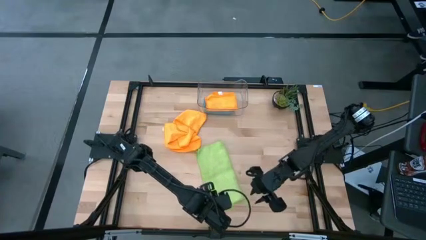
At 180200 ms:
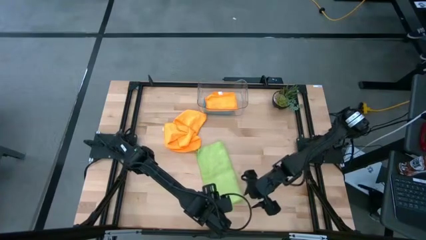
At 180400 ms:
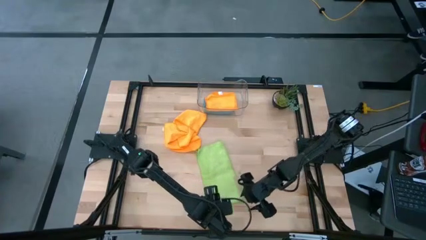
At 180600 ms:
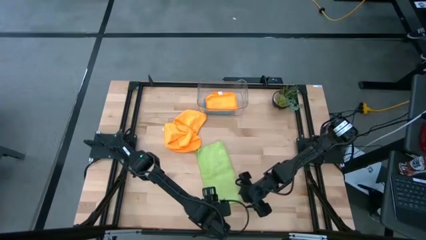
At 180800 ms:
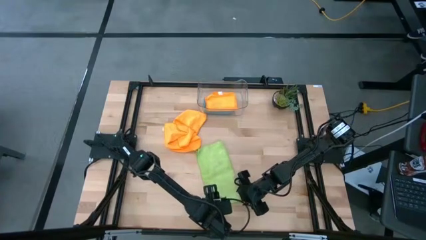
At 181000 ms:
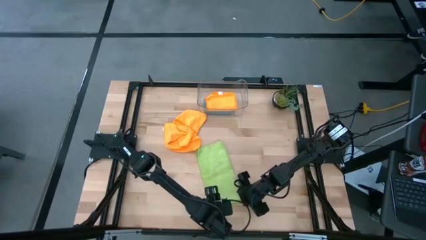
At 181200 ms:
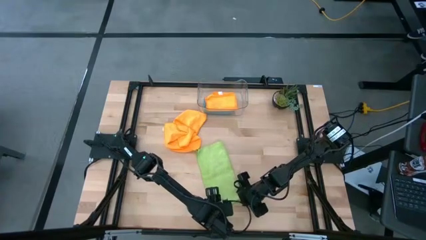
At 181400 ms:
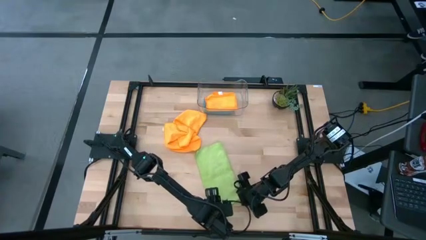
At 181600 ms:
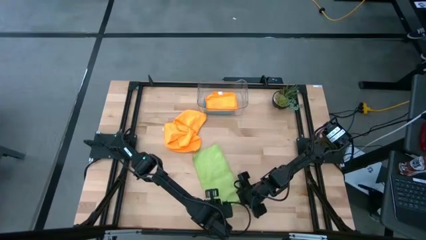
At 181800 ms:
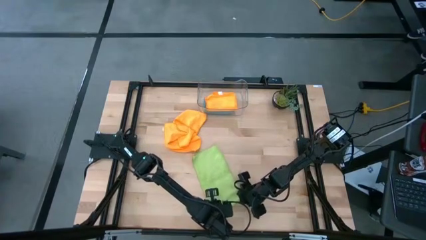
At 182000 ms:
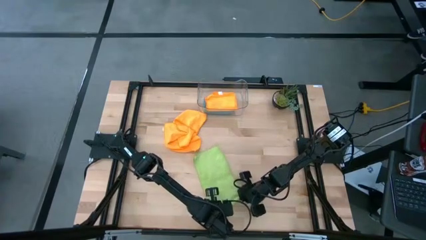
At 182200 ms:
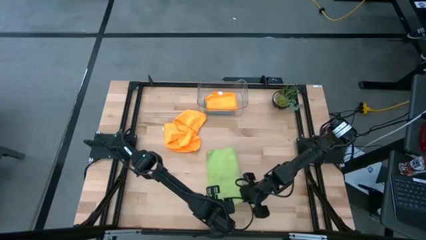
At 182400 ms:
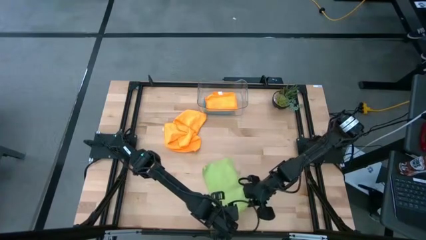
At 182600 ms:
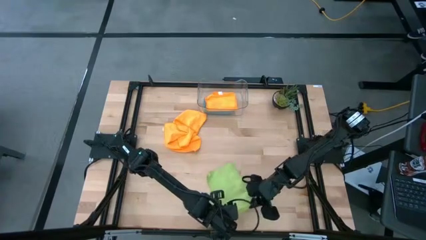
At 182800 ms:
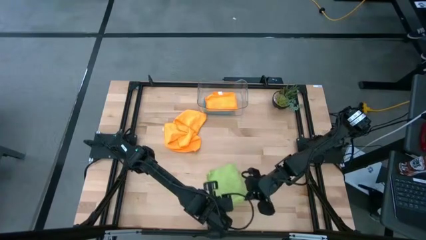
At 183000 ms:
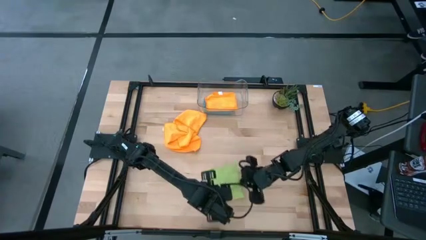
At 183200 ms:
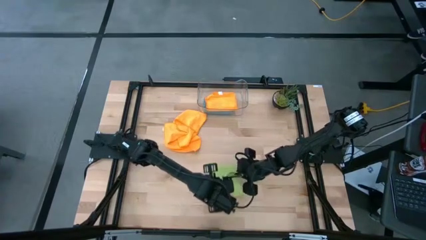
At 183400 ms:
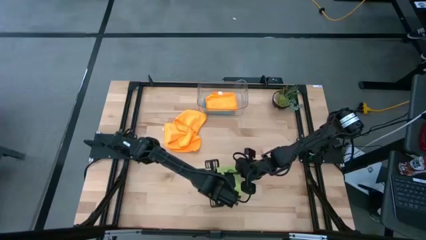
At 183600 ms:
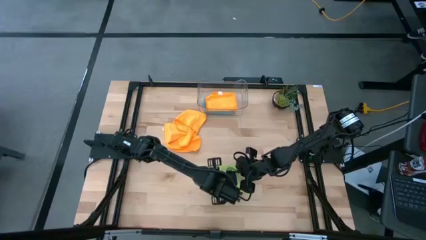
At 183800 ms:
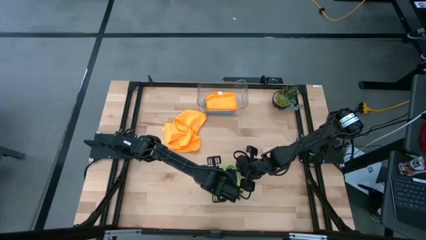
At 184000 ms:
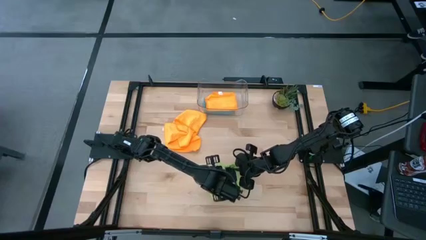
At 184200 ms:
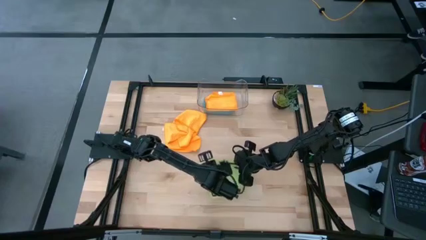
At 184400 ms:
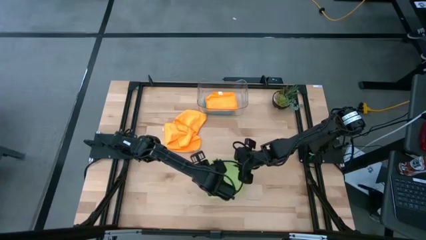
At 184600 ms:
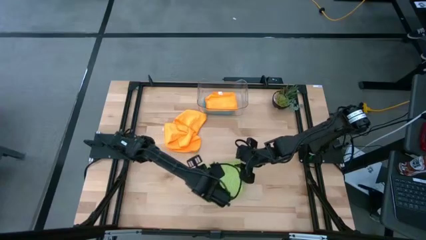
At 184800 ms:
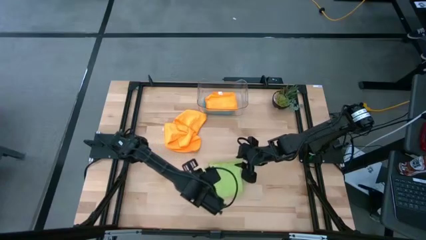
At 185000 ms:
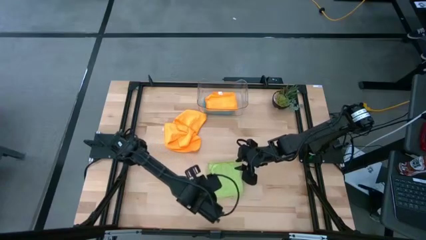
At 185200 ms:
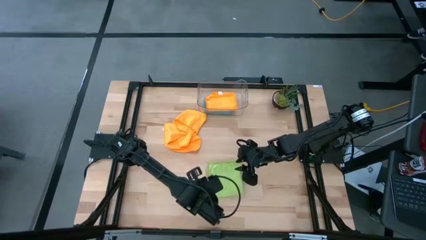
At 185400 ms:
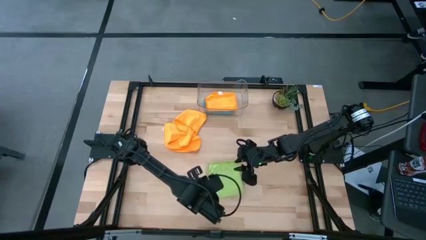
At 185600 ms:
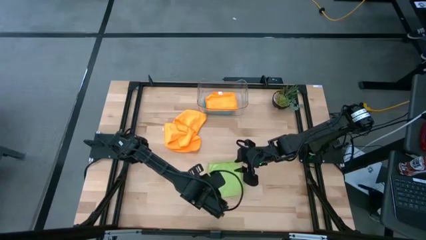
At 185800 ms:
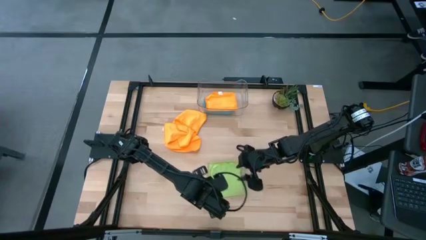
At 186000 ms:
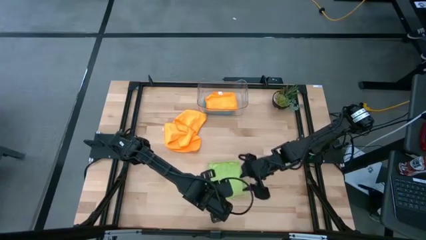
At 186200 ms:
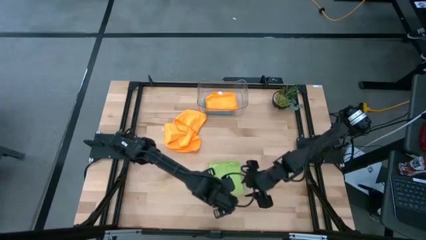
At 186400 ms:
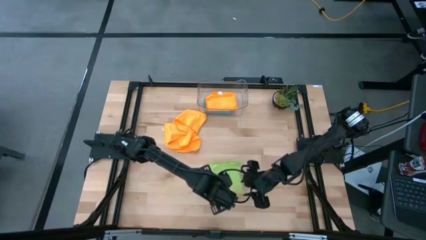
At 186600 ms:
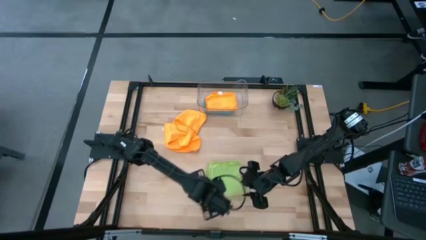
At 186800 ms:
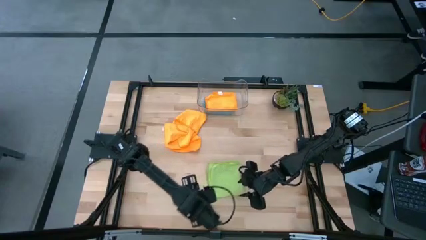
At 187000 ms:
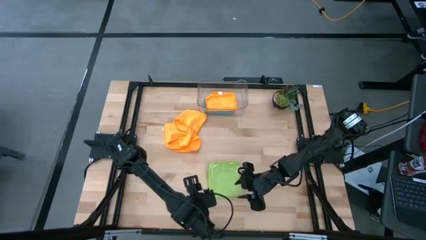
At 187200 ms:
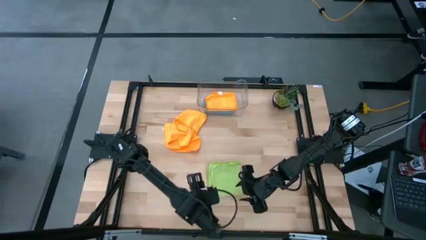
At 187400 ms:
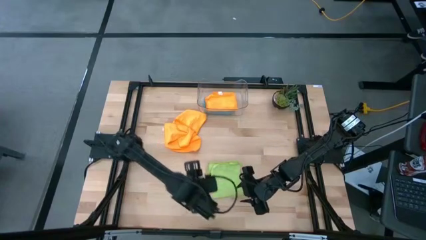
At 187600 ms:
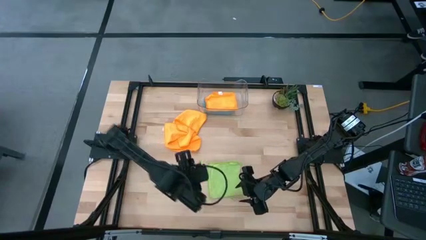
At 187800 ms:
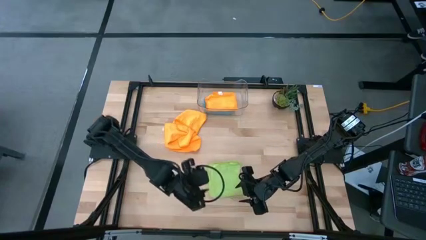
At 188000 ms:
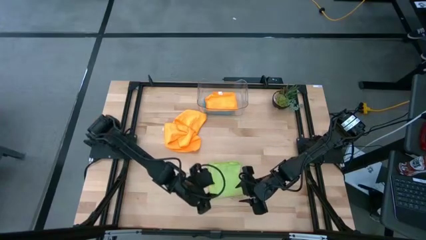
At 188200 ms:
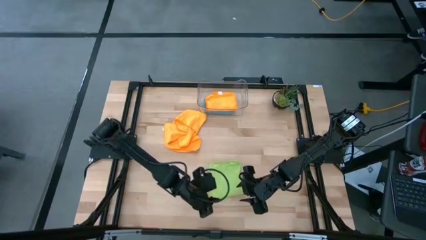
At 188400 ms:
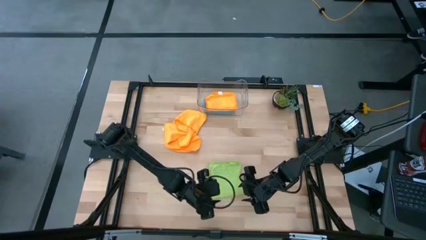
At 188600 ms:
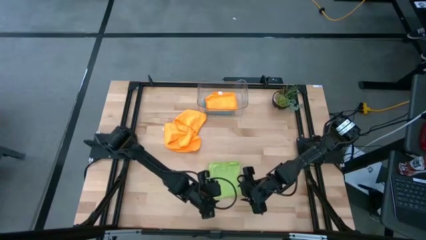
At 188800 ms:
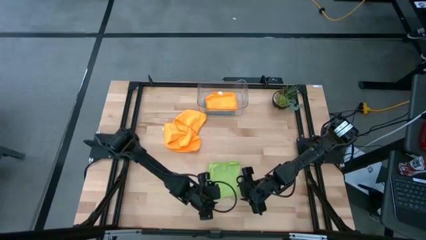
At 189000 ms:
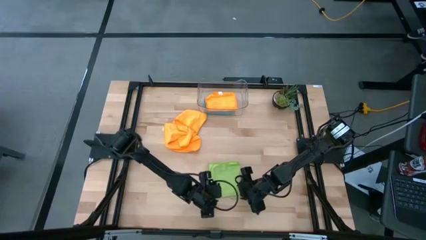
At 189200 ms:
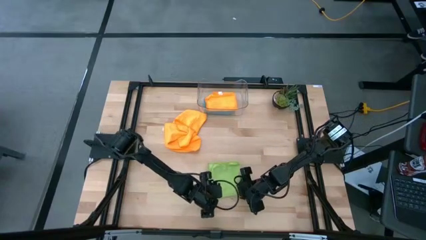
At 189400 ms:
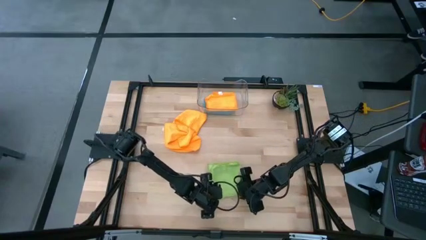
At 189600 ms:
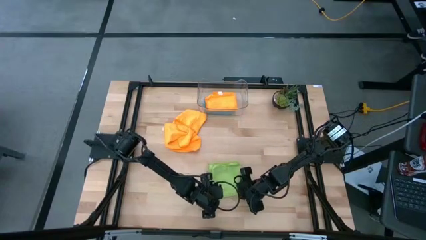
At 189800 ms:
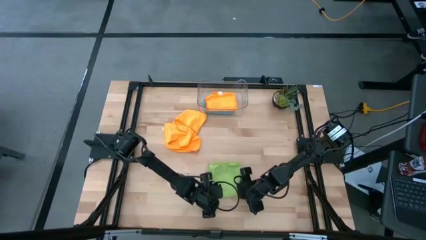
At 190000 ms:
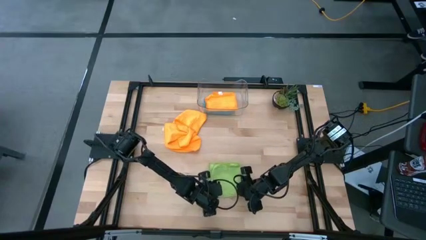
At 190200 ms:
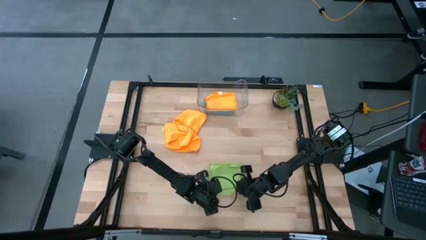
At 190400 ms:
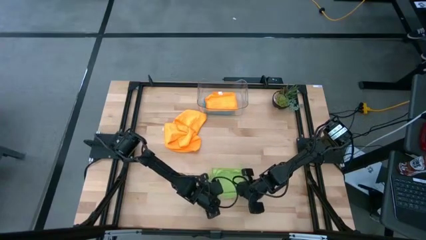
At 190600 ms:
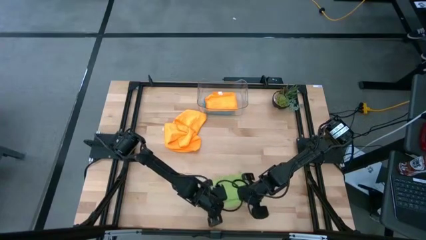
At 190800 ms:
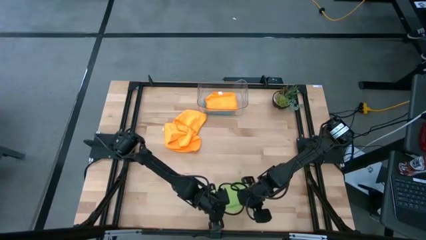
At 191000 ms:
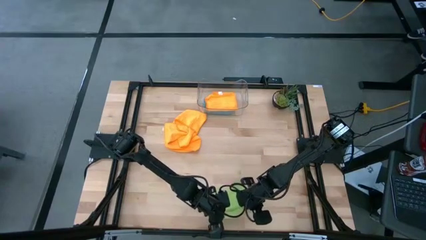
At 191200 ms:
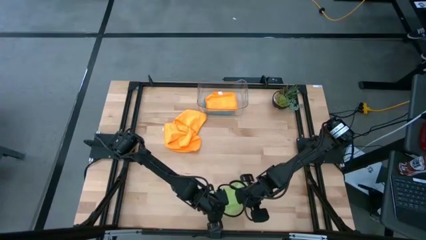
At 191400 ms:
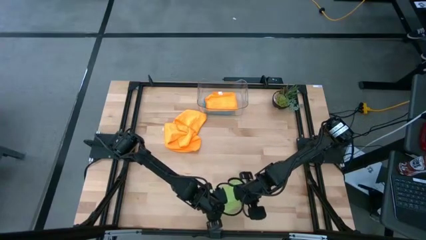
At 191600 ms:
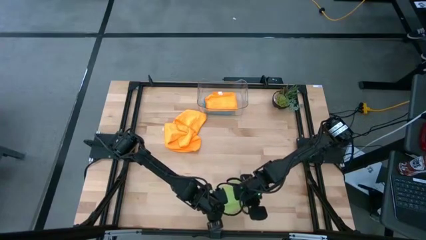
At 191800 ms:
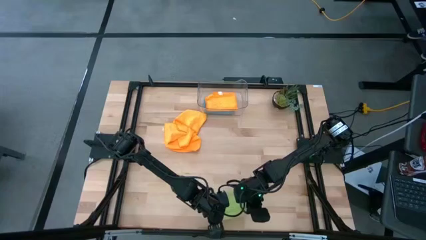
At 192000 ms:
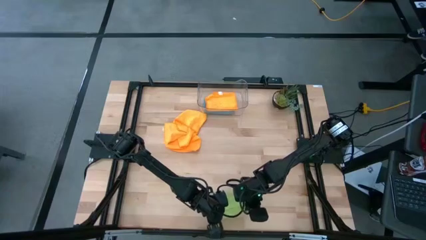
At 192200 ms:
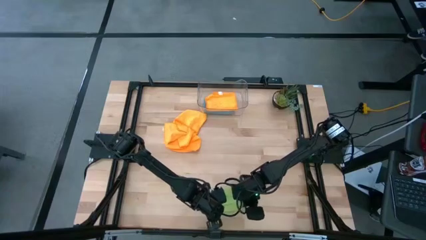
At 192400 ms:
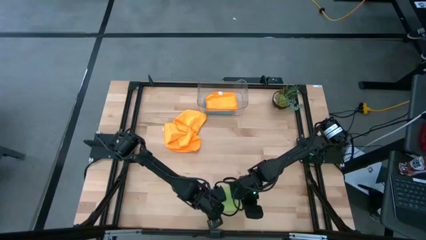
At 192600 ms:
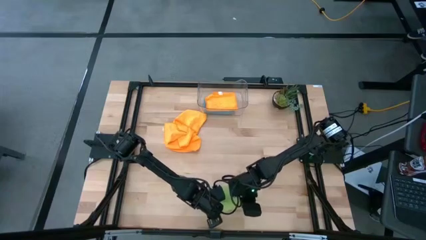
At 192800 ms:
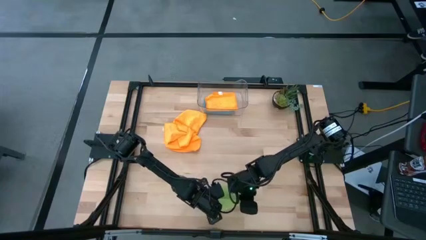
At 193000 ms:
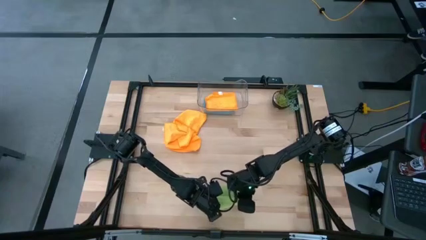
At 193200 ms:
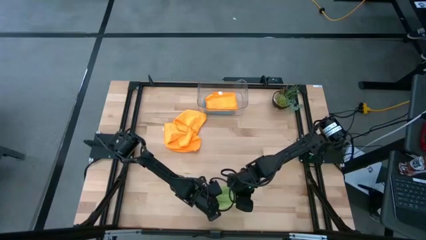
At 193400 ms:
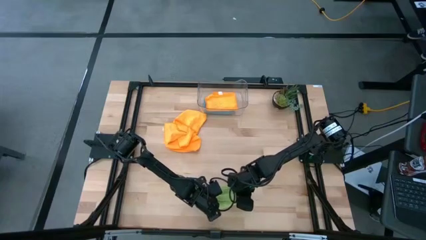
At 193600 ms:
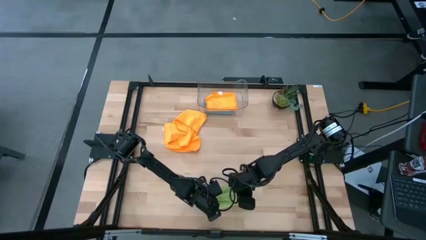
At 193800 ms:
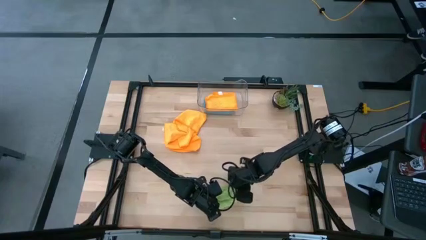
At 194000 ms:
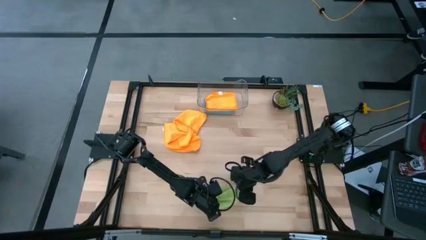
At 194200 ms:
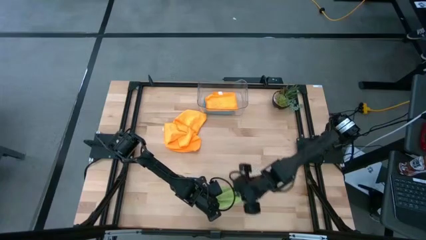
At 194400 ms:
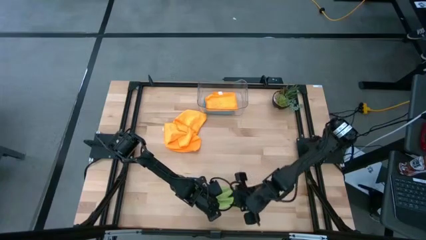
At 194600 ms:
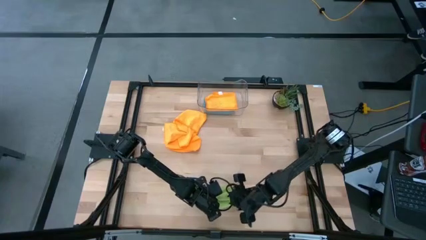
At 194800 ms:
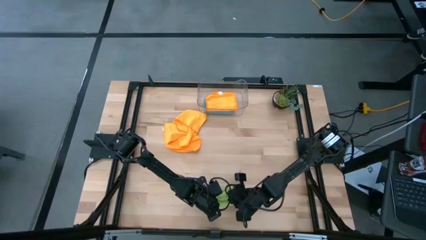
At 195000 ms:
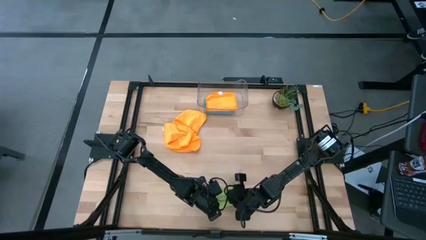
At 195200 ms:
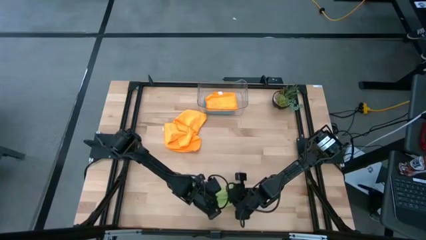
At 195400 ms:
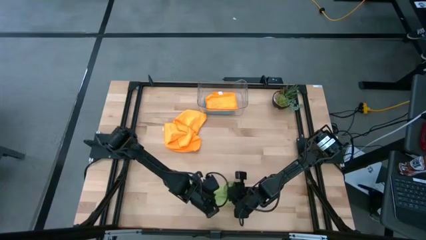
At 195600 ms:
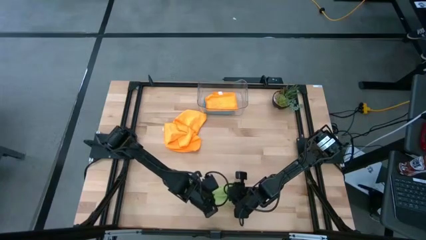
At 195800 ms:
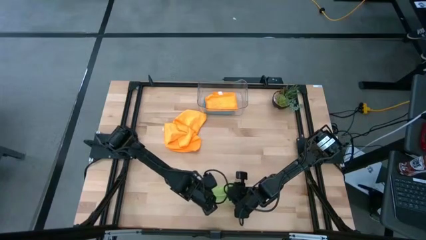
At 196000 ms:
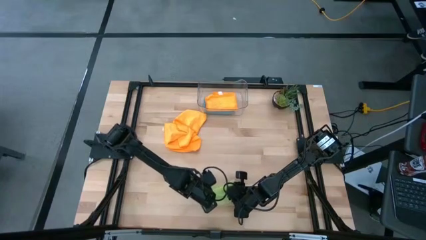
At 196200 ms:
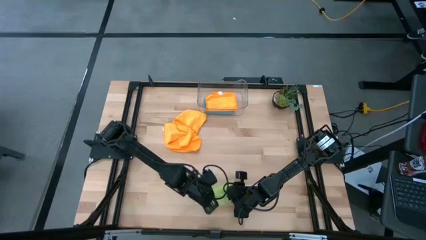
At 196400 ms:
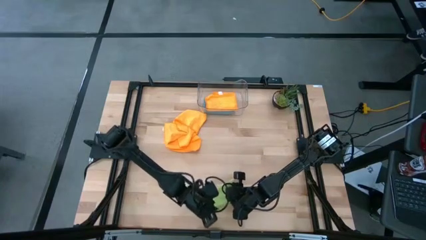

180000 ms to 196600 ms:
Task: Fold microfiber towels
Fold the green microfiber cloth
